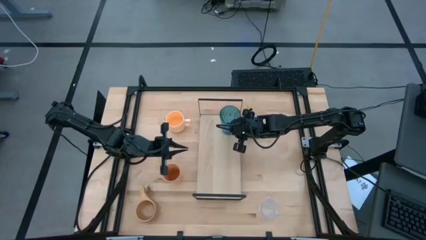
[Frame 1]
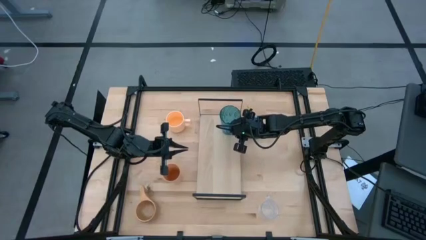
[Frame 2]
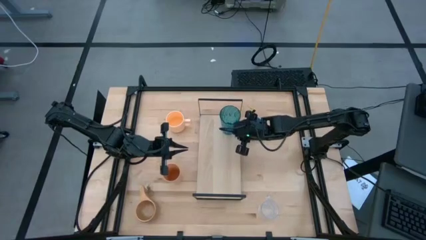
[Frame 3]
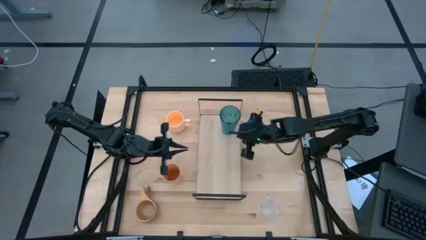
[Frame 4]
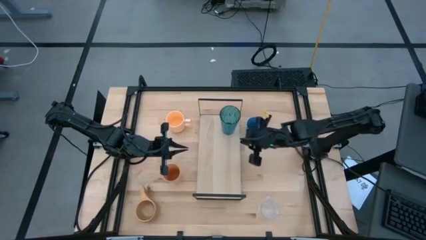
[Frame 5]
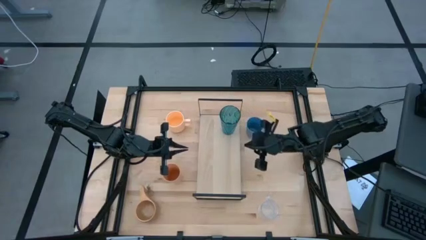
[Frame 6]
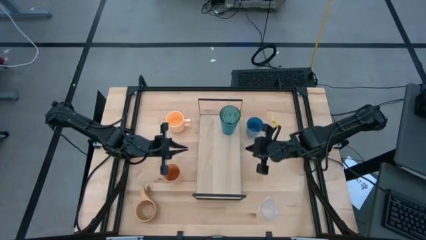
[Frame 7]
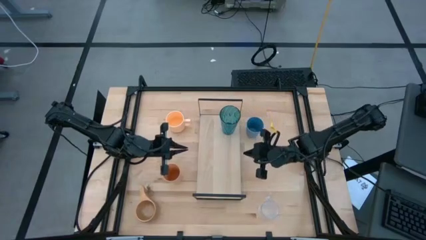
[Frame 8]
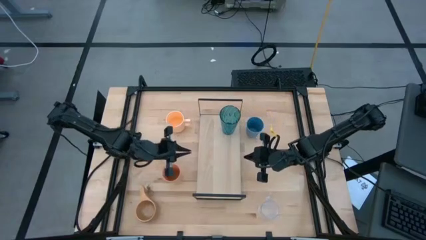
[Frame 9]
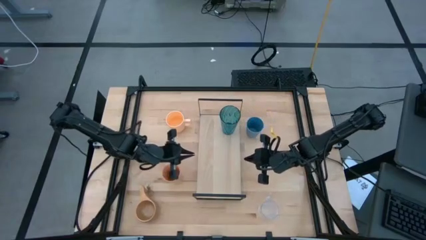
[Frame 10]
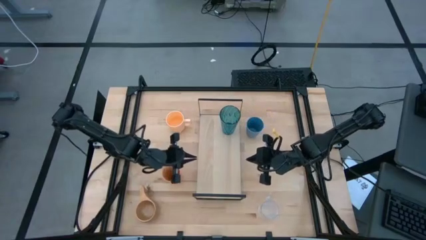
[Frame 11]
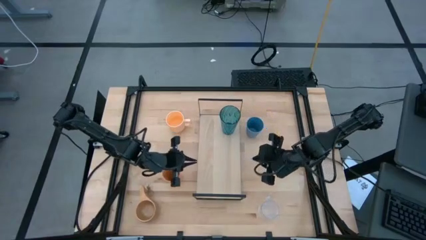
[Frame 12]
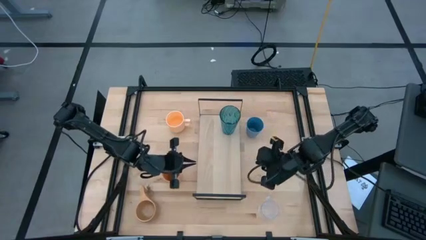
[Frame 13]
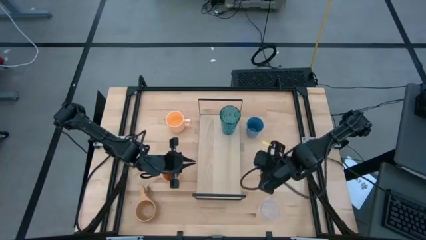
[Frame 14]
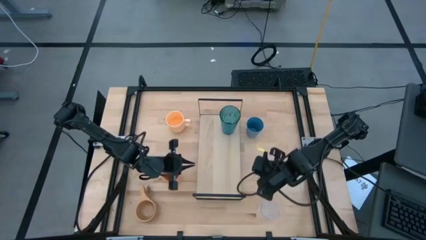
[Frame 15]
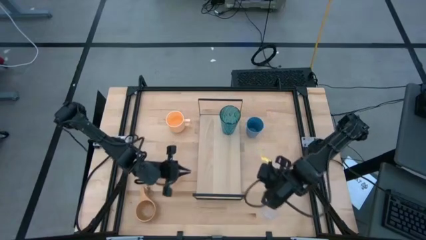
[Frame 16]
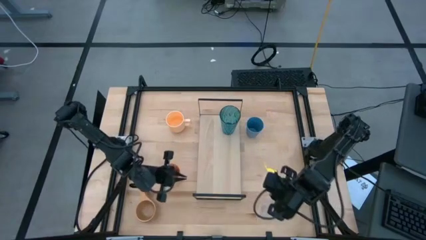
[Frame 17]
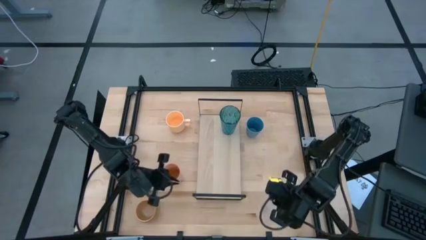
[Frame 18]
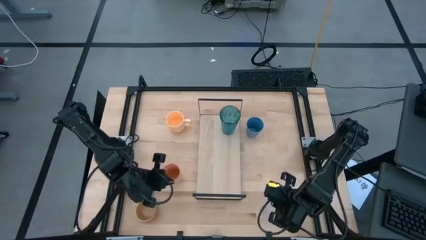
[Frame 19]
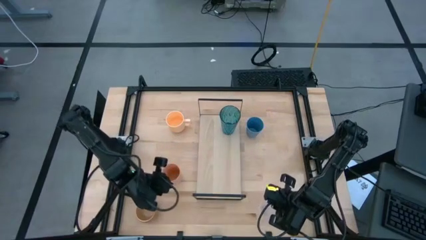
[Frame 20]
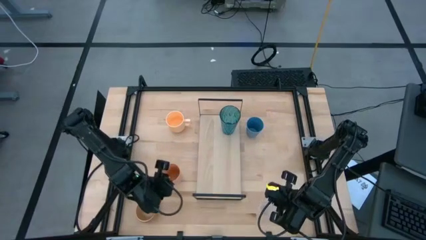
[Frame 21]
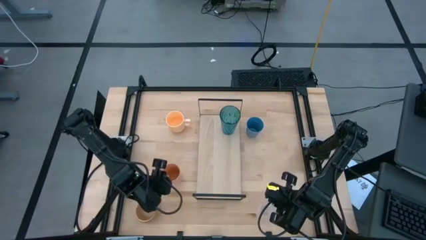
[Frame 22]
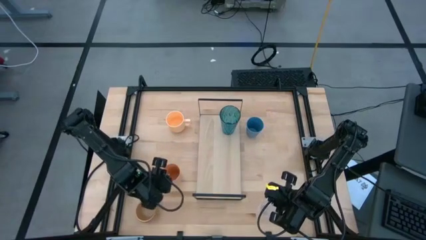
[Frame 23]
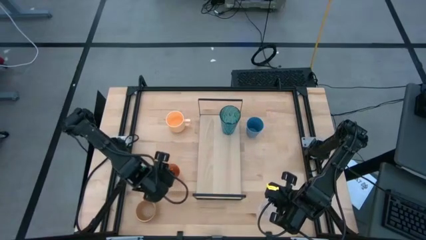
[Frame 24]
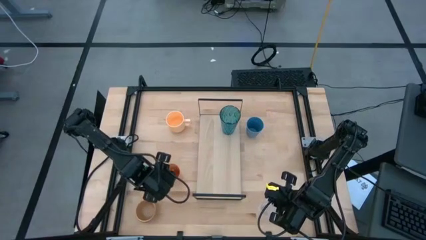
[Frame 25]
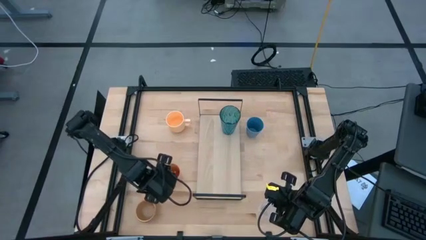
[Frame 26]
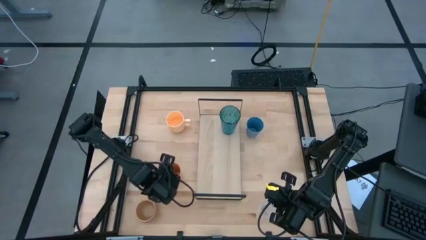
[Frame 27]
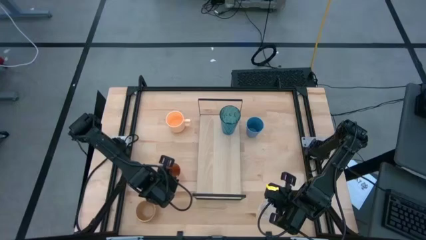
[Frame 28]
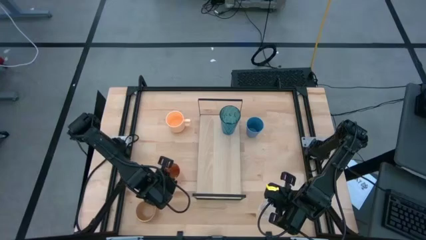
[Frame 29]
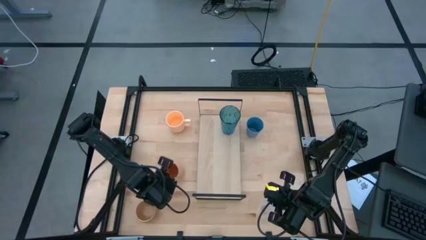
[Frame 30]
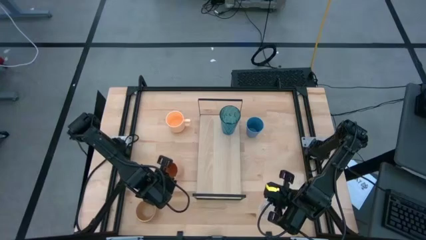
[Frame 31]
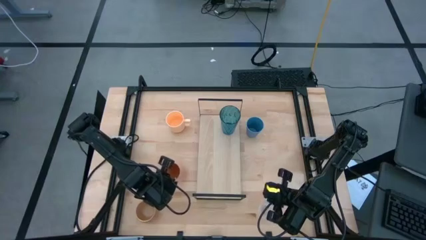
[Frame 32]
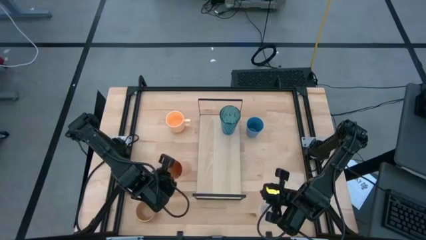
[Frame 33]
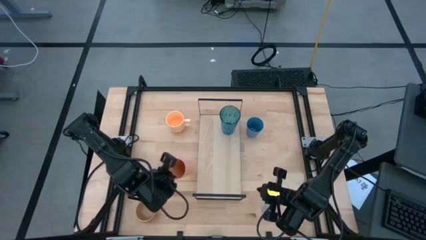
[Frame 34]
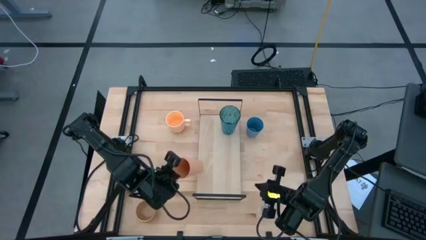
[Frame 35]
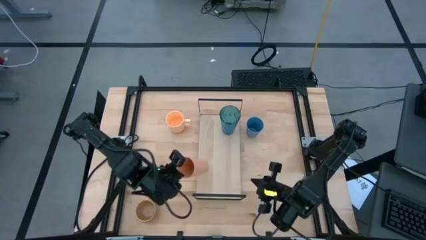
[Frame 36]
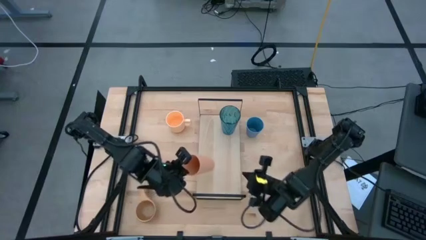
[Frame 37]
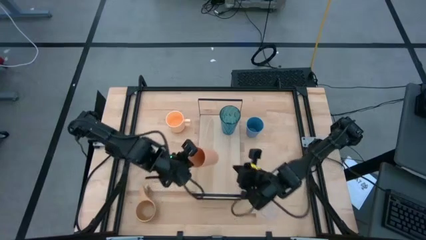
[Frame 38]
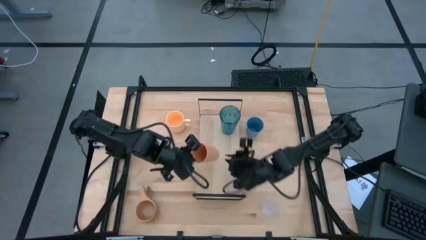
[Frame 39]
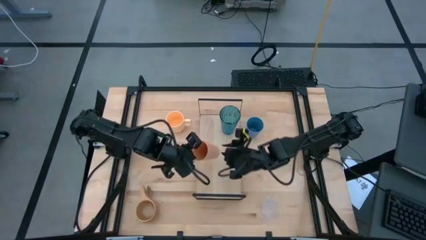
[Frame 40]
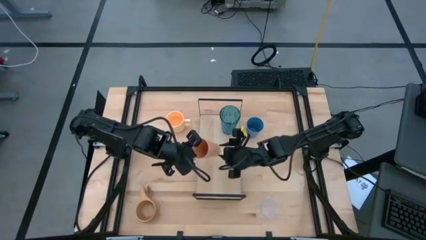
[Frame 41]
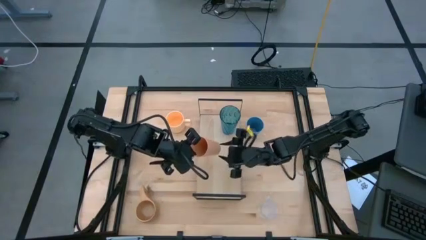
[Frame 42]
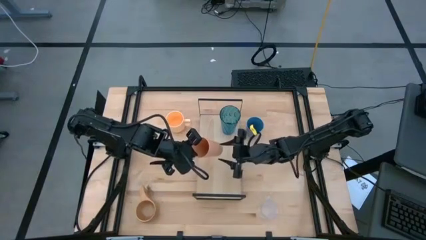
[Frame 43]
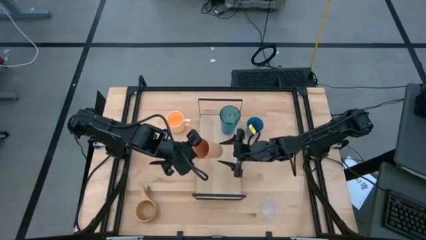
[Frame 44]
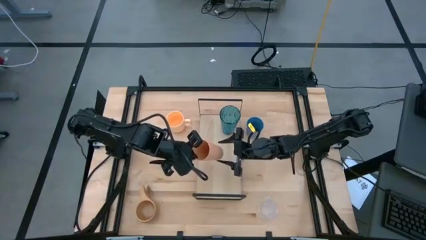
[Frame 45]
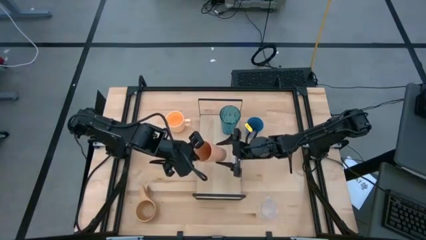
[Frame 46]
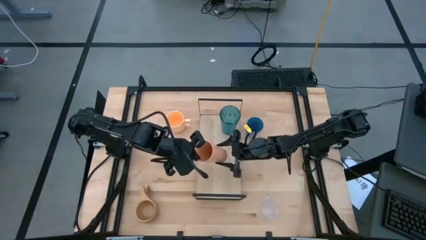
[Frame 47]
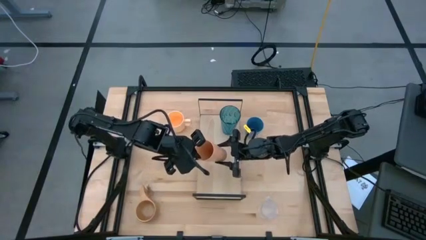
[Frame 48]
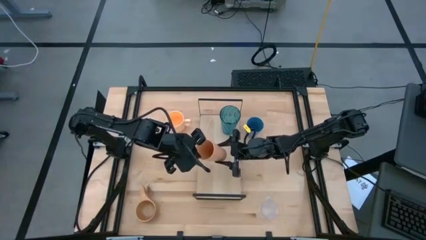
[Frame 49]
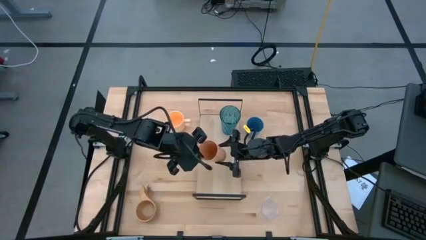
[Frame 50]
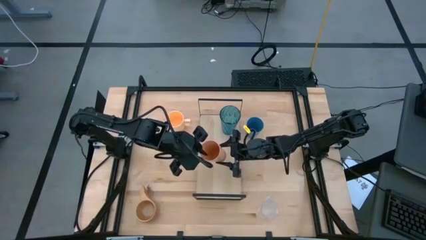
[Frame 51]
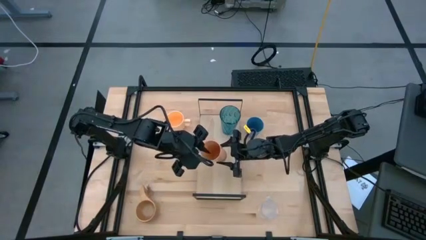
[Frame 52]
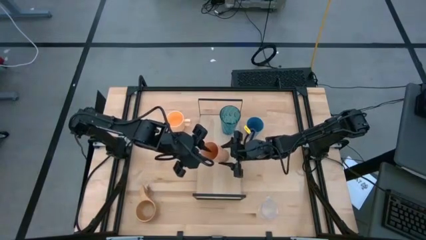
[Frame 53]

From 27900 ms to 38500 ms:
Task: Stack small to large cups/mugs on shelf
Put the orange cup on the shelf
